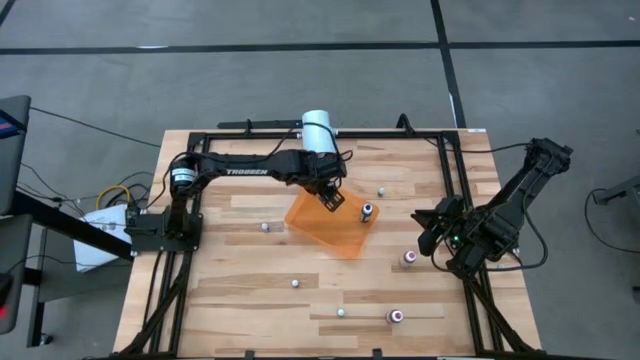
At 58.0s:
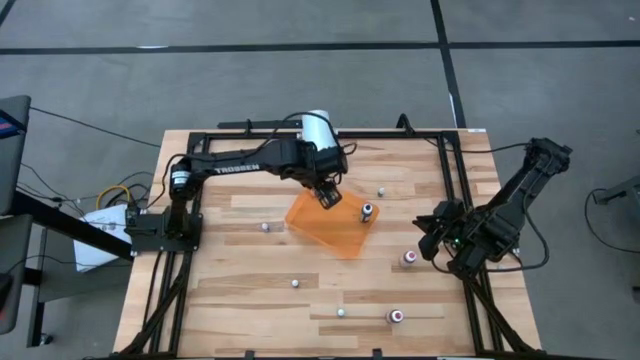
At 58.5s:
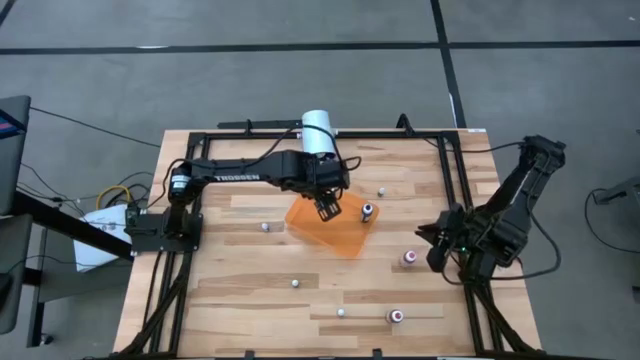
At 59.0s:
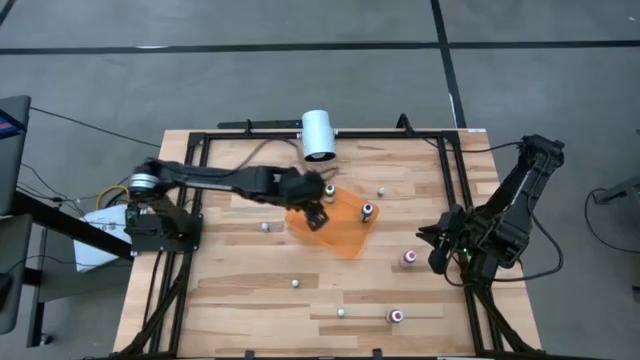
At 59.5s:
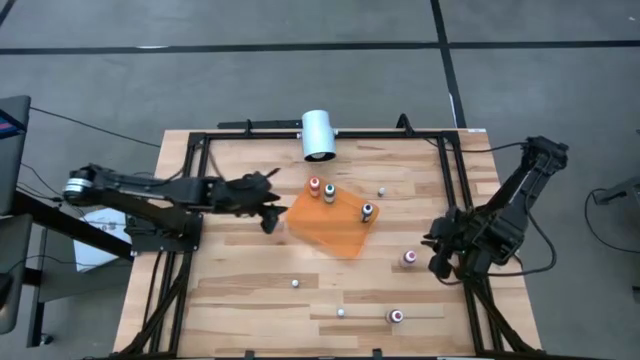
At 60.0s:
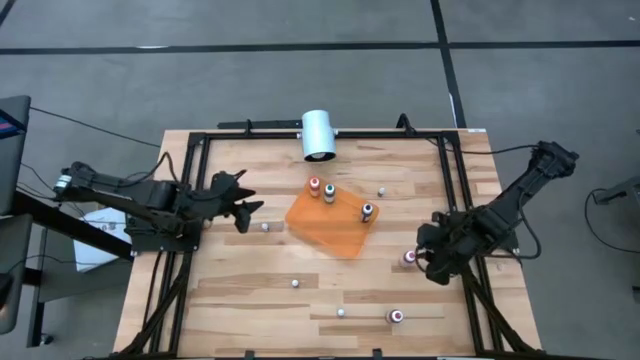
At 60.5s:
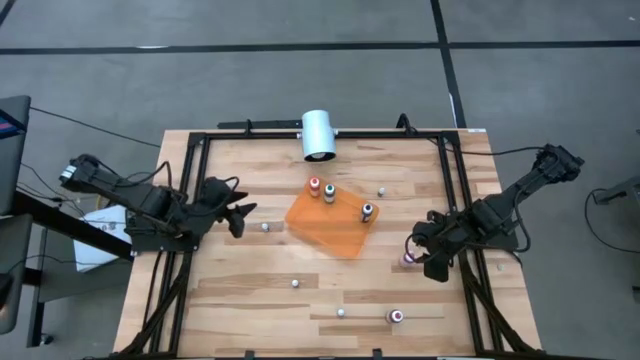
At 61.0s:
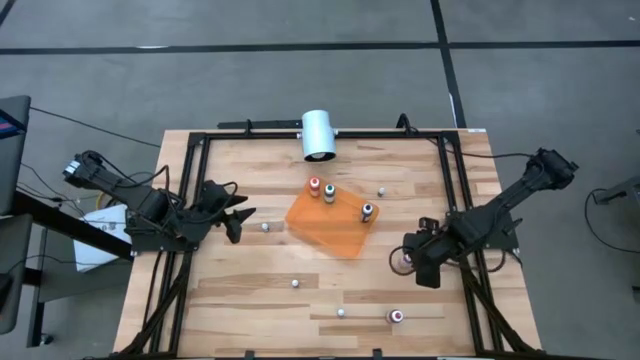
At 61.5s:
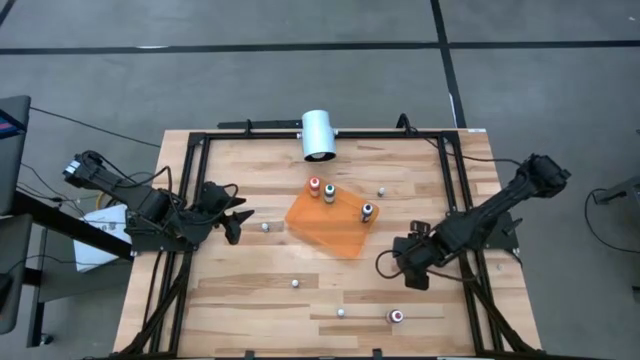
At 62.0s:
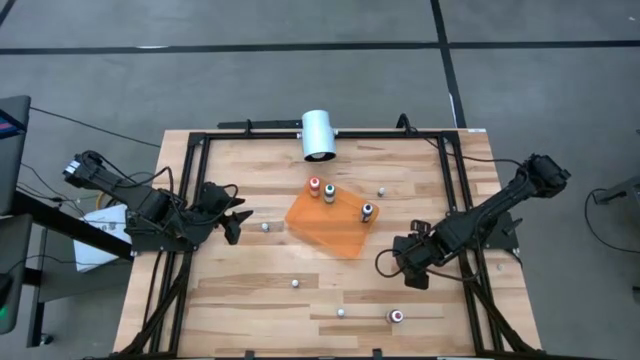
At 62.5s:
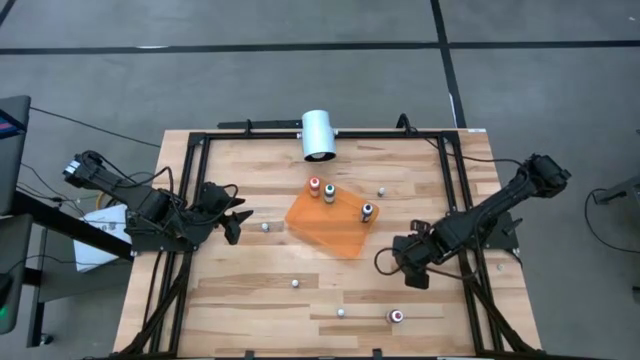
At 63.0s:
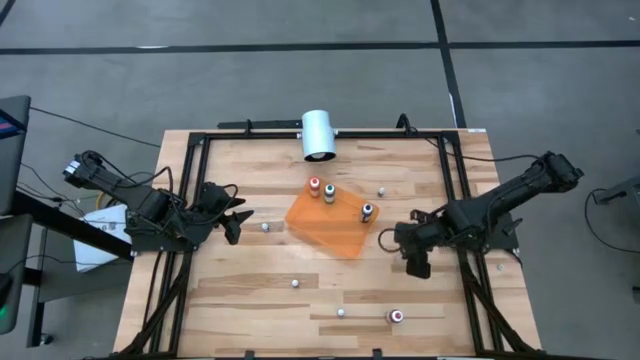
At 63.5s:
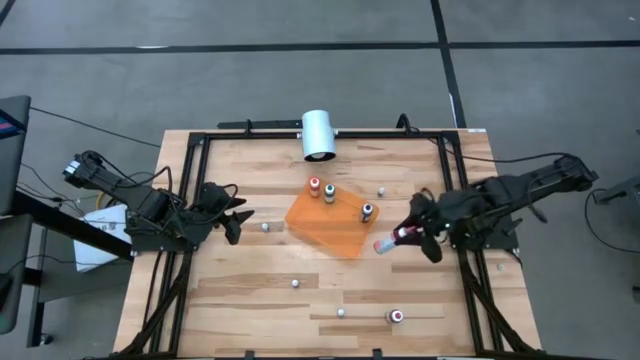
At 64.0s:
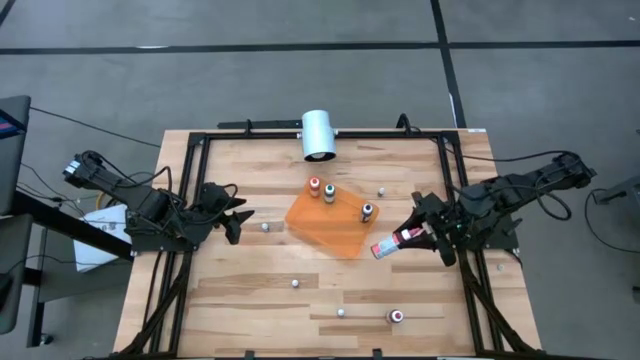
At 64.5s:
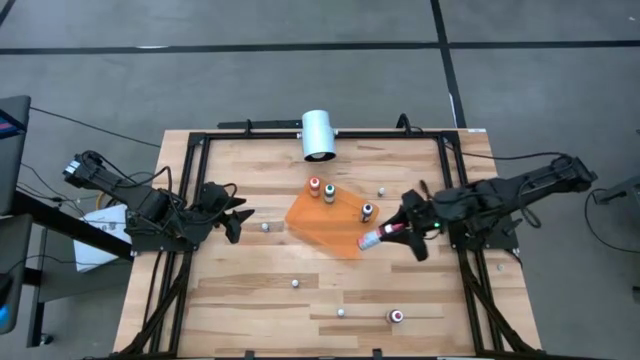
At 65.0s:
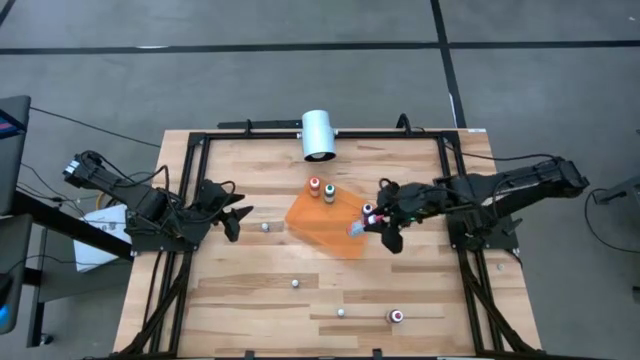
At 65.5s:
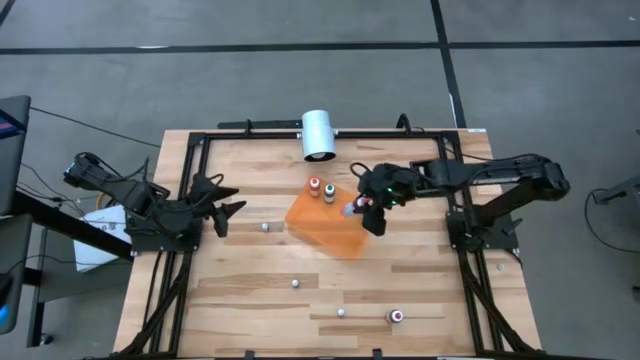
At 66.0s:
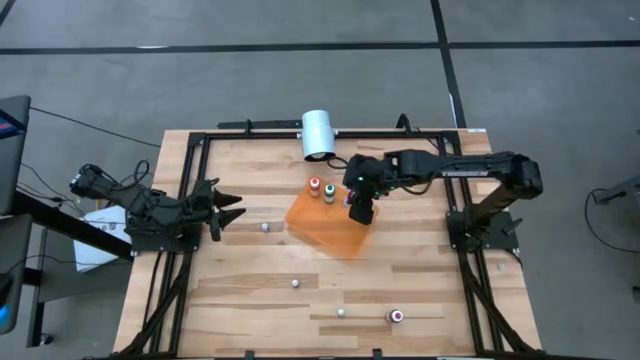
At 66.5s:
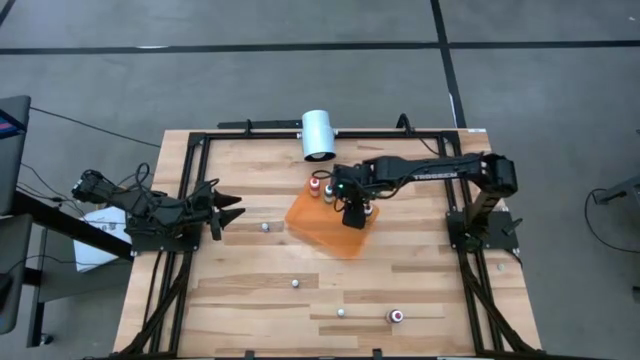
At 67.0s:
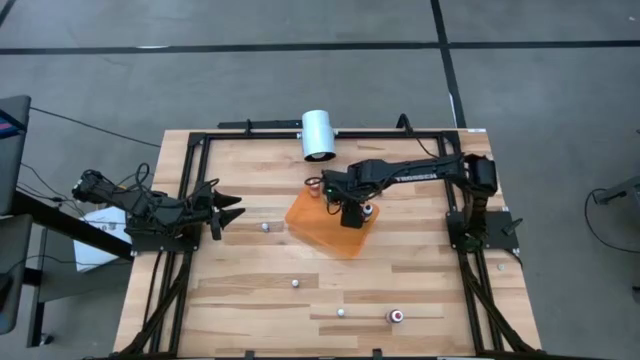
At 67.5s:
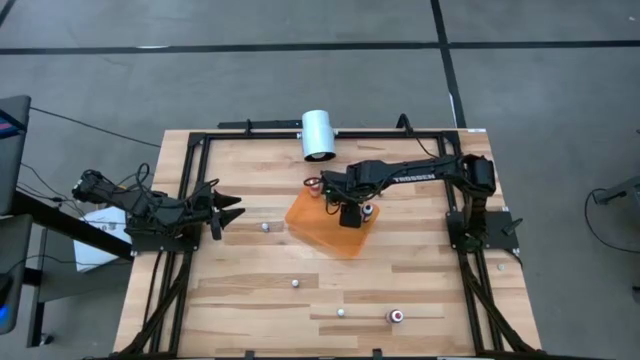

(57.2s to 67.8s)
Task: Pick & Place food coloring
Put the pink food coloring bottle into the bin

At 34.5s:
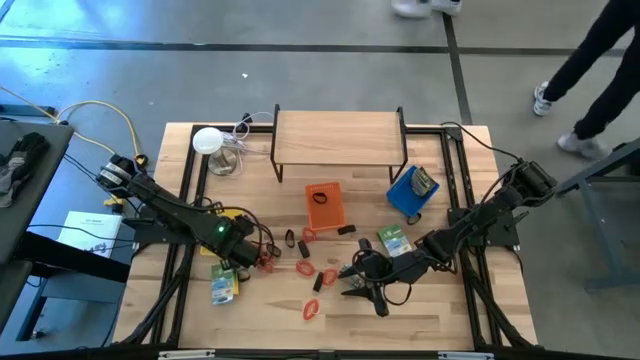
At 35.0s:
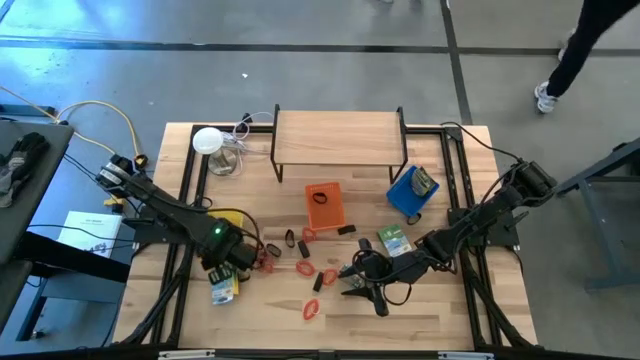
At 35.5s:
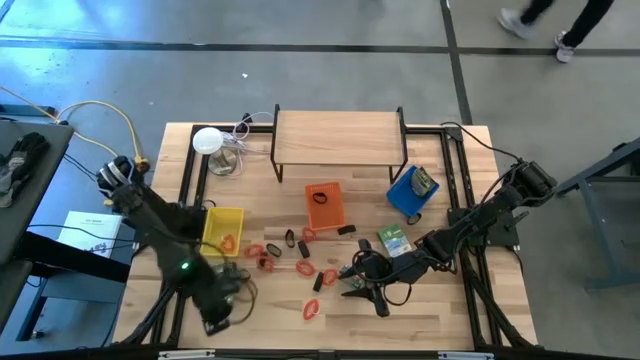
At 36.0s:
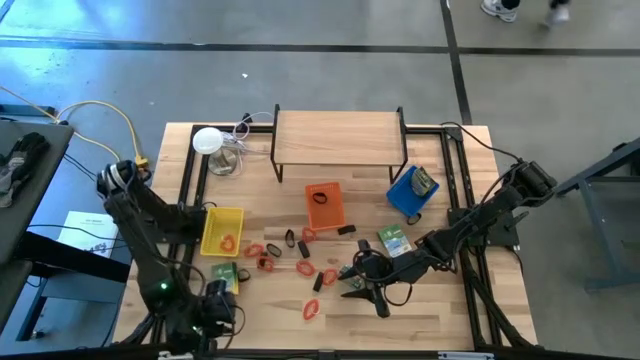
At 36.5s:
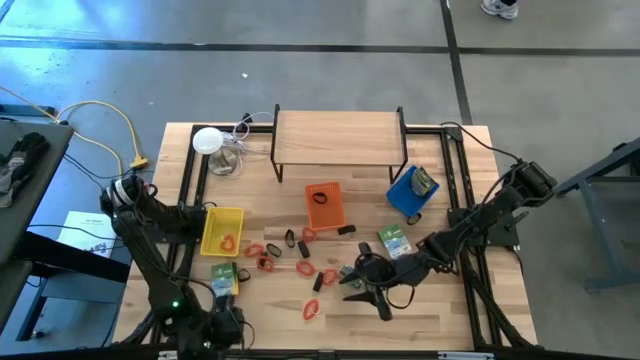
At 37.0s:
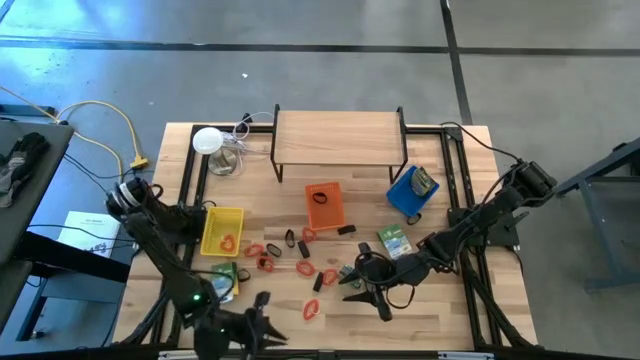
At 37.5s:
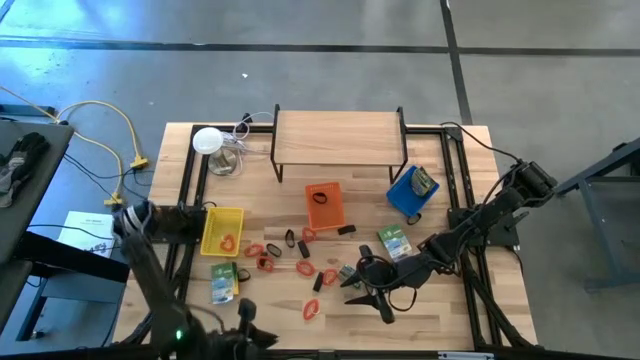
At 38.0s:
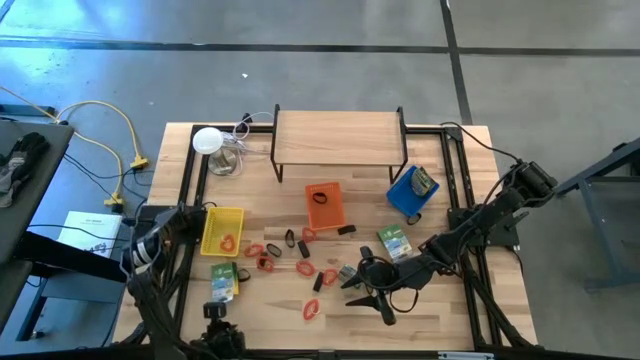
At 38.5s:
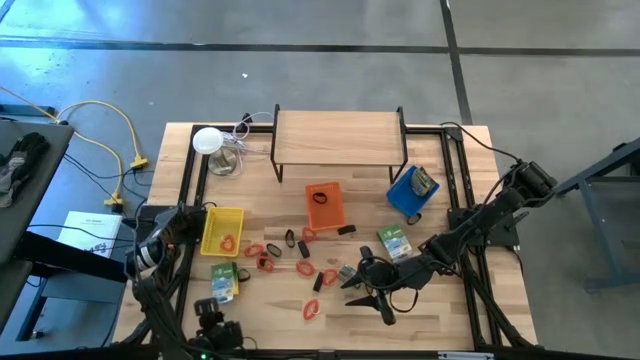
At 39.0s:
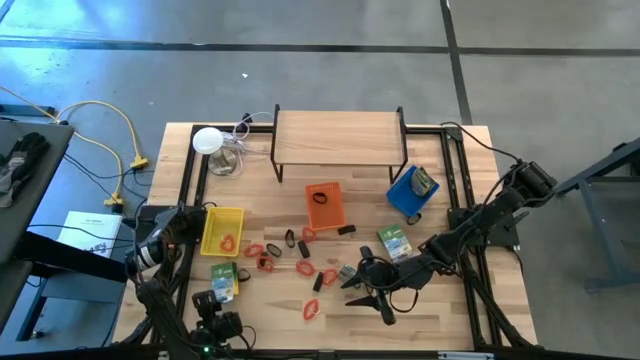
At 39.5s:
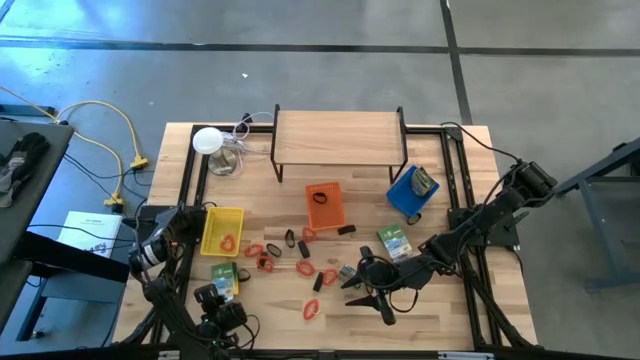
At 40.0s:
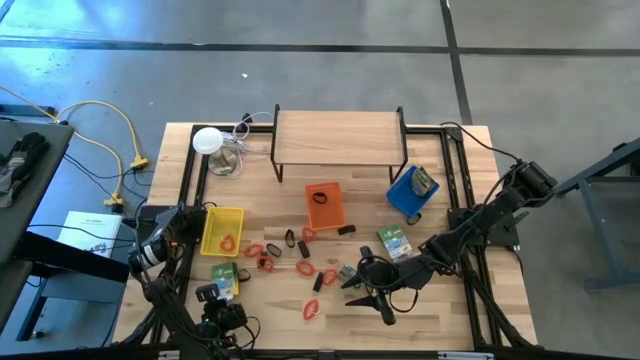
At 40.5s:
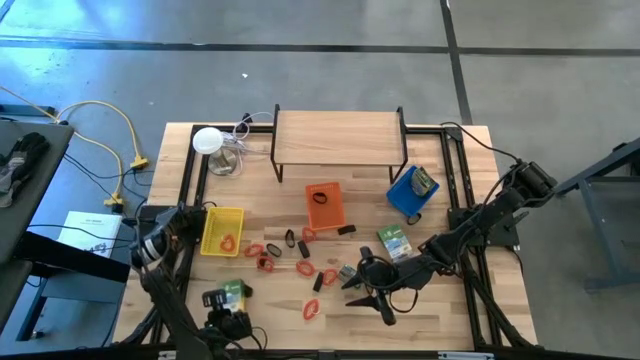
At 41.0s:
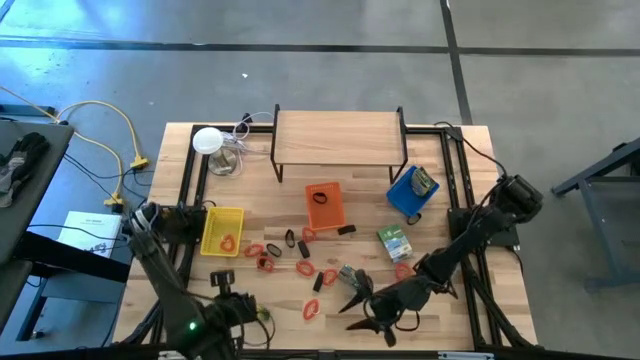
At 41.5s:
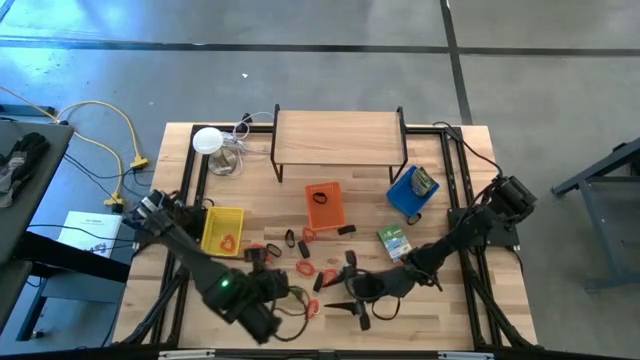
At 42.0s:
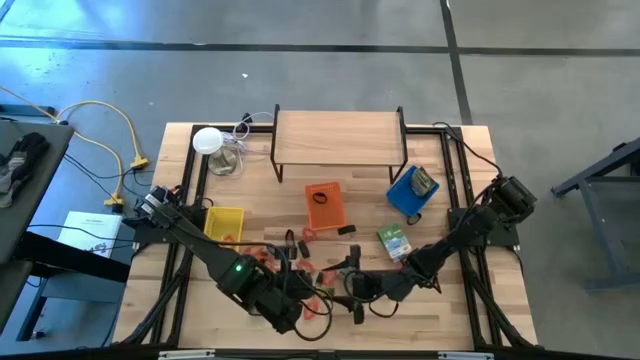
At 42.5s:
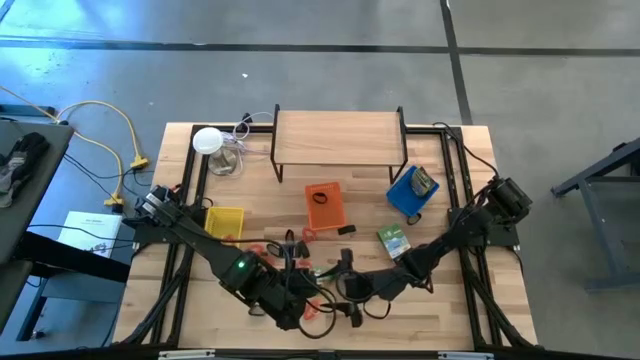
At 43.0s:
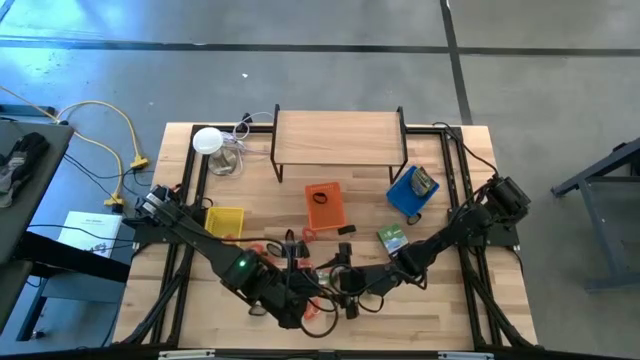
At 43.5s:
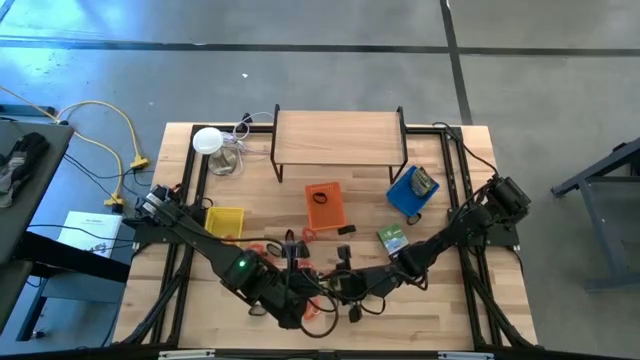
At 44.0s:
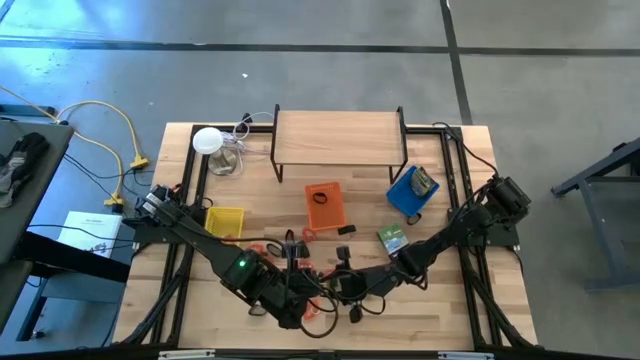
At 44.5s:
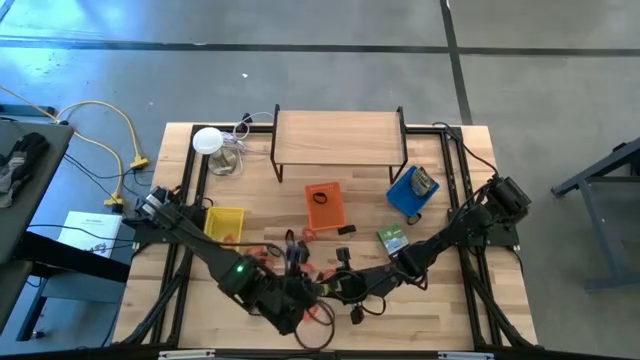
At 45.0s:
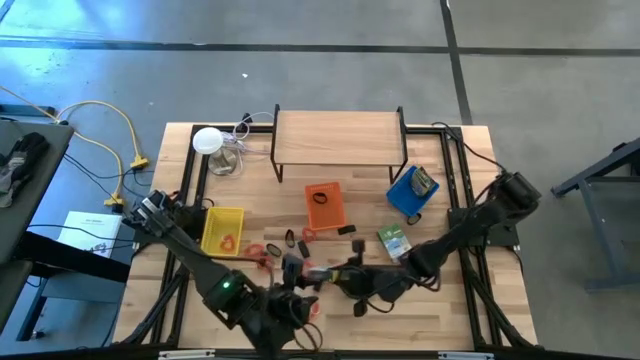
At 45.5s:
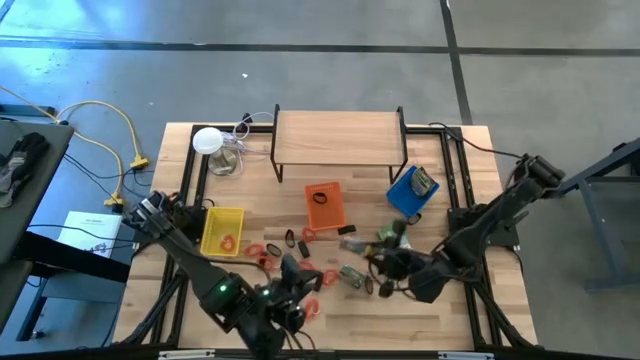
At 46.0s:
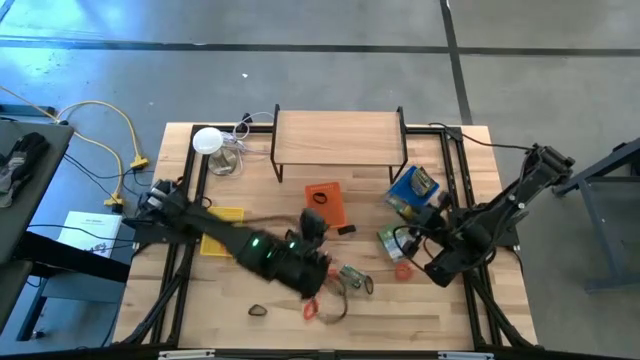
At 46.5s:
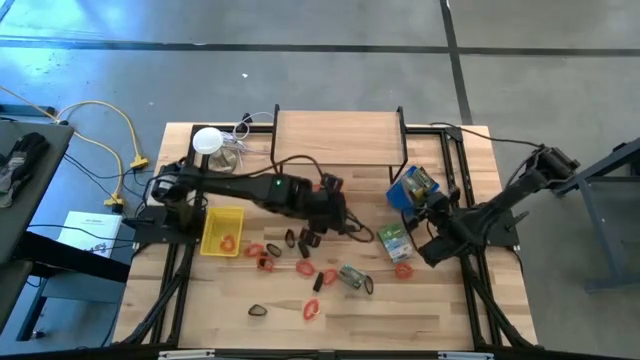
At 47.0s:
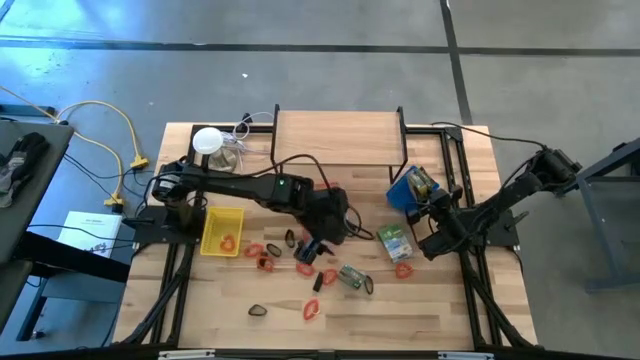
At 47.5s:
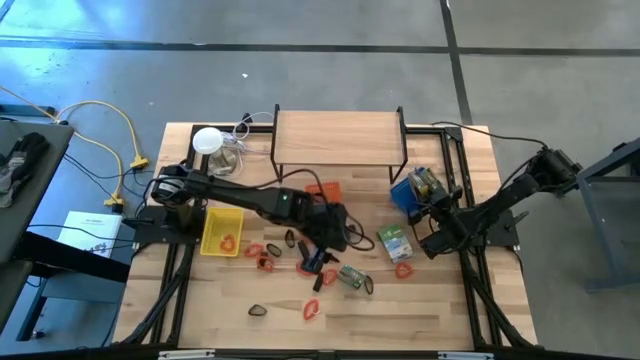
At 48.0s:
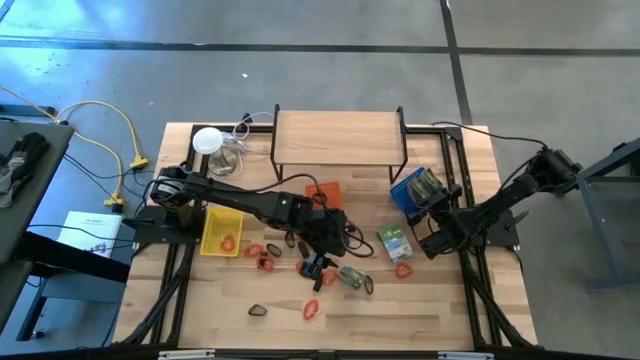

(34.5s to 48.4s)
Task: Pick & Place Office Desk Supplies
Put the yellow crayon box into the blue bin
